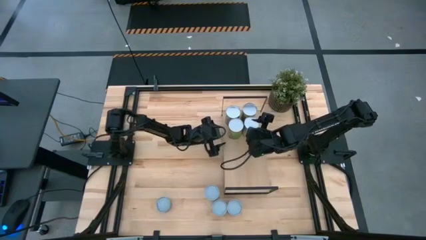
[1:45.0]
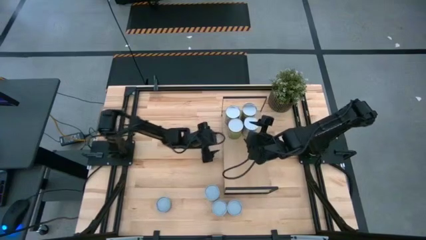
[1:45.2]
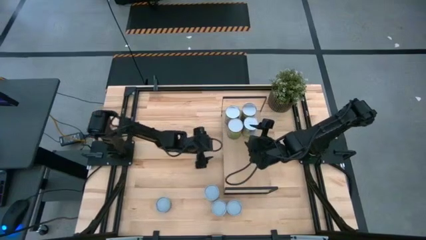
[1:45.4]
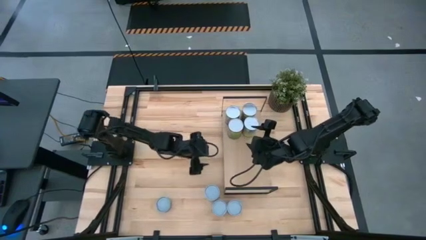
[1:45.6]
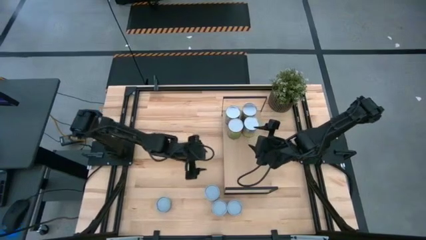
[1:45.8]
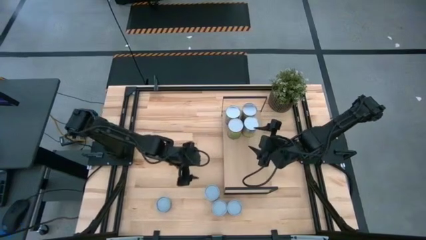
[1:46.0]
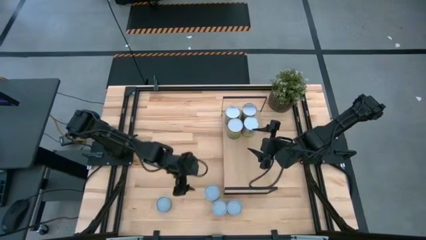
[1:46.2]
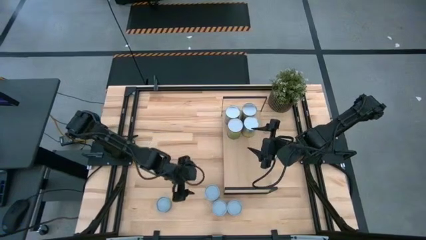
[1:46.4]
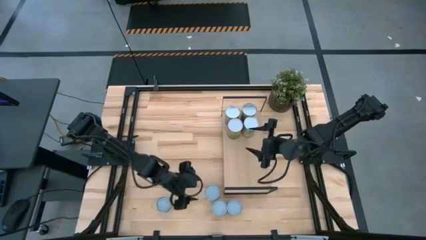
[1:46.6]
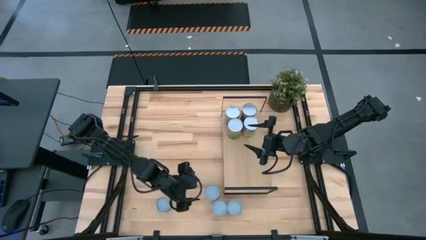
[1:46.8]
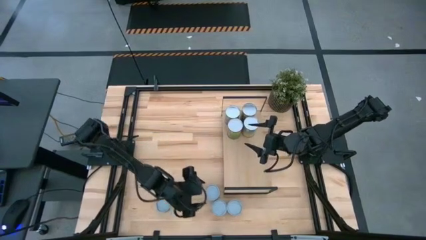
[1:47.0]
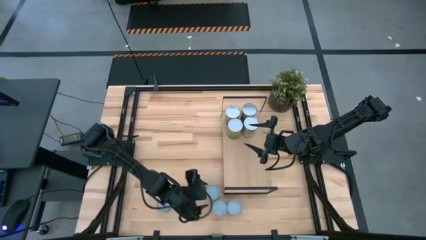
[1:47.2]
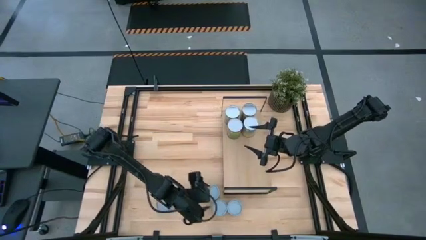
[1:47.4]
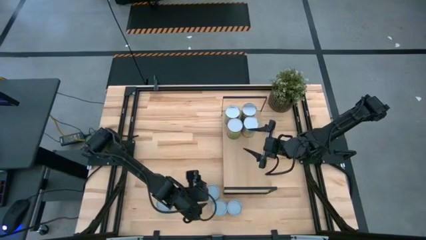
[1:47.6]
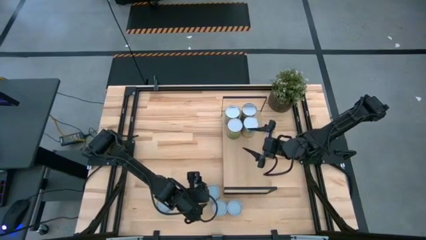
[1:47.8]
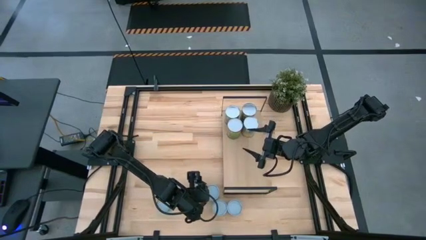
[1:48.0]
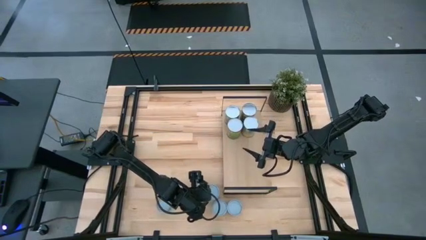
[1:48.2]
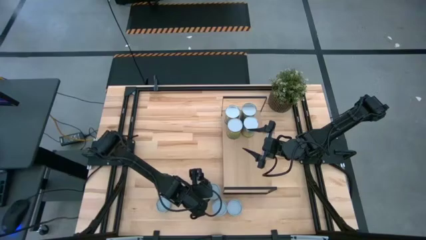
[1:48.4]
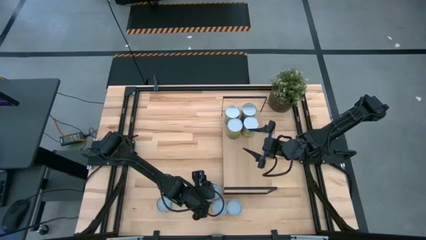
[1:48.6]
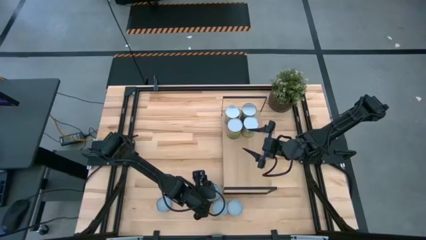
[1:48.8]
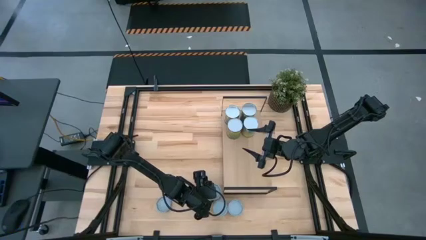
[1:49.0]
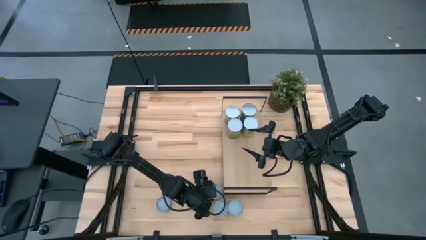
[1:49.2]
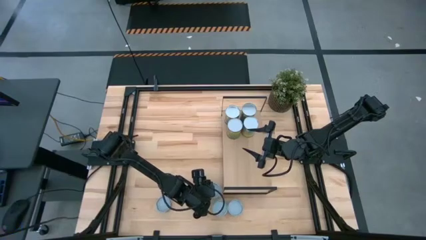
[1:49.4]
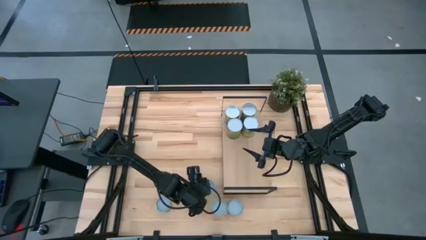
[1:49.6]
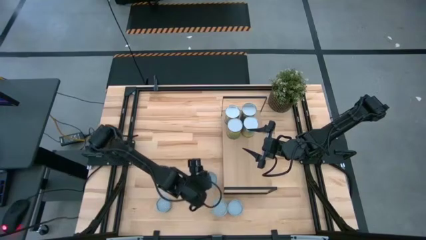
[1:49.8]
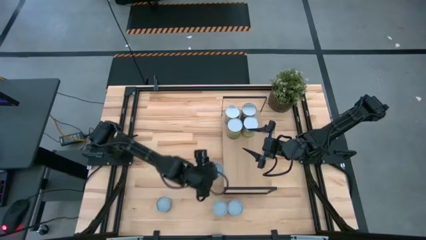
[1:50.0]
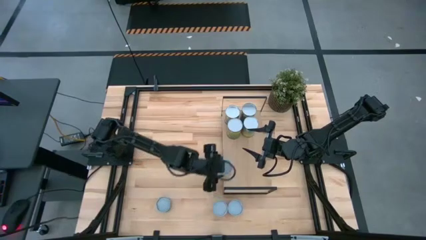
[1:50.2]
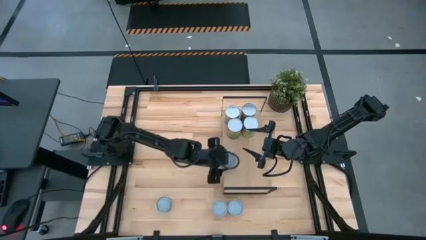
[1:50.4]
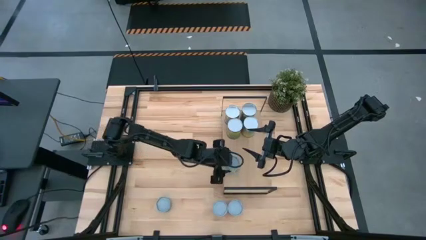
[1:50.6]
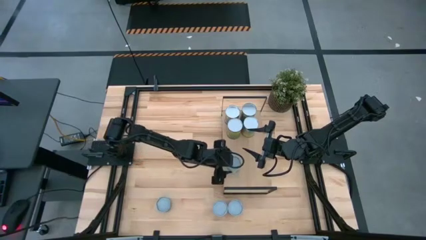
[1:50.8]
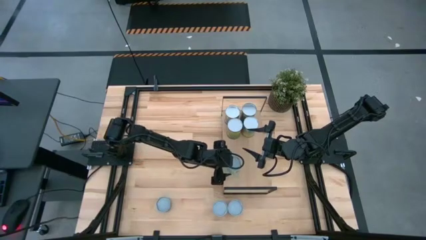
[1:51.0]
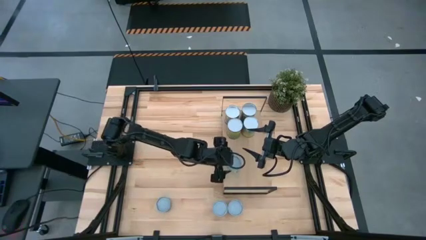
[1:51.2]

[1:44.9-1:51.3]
Task: Pick and place cans onto a shelf
Put the canned mixed vegetable on the shelf

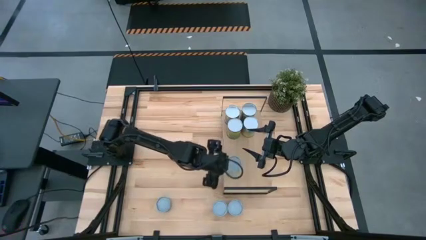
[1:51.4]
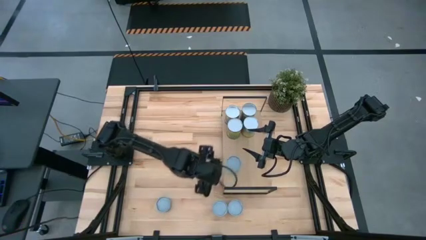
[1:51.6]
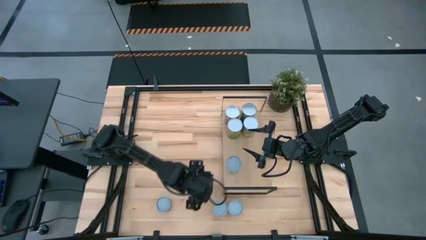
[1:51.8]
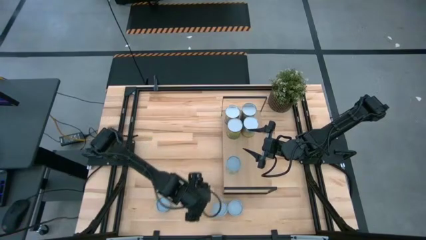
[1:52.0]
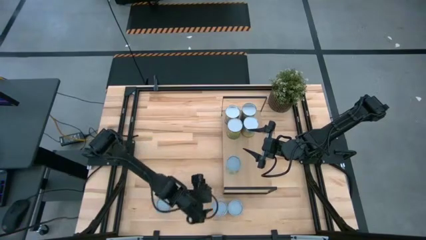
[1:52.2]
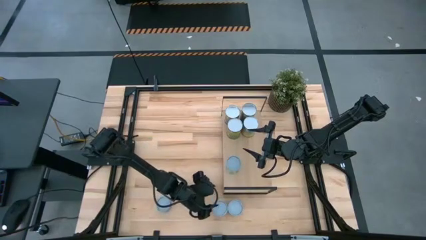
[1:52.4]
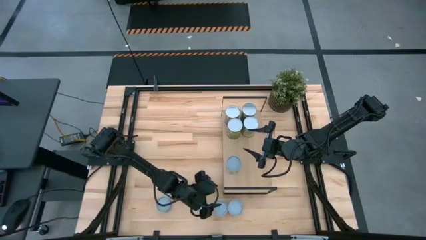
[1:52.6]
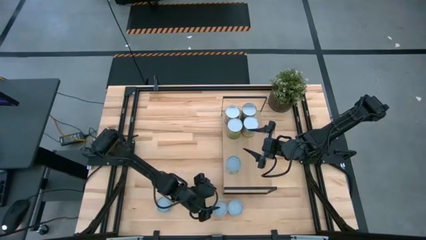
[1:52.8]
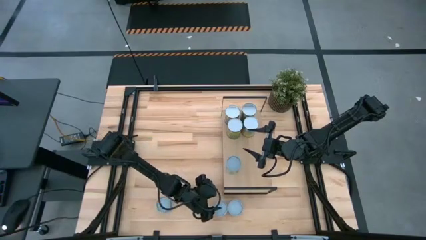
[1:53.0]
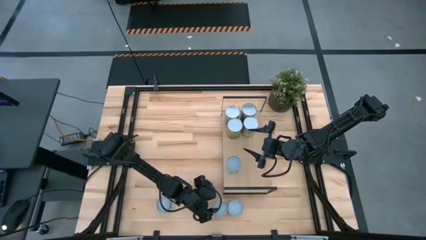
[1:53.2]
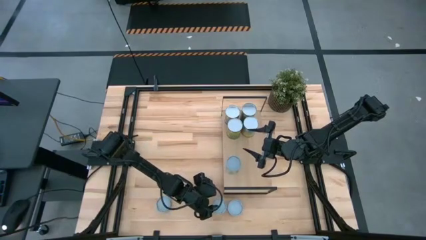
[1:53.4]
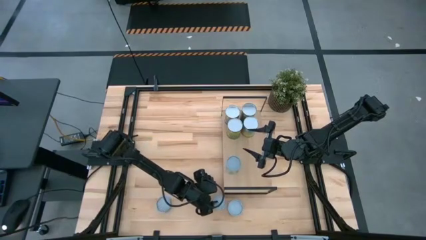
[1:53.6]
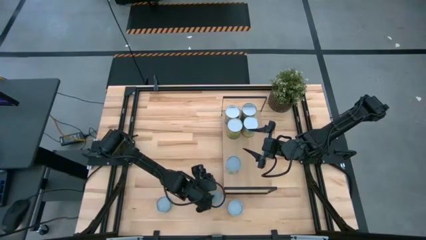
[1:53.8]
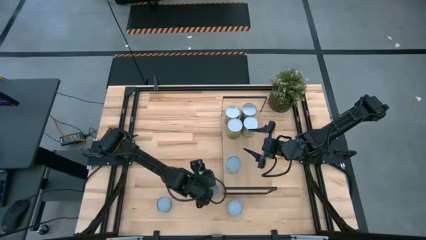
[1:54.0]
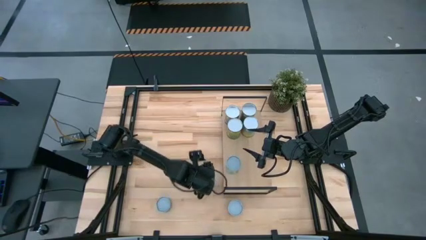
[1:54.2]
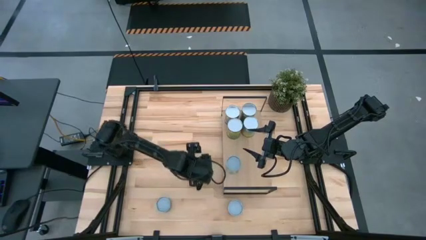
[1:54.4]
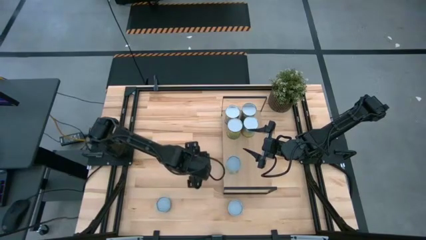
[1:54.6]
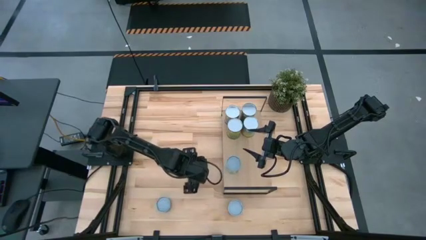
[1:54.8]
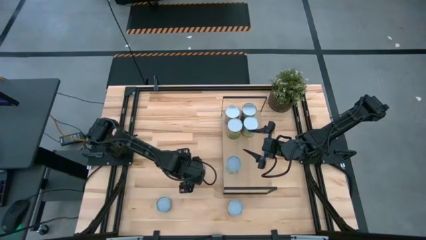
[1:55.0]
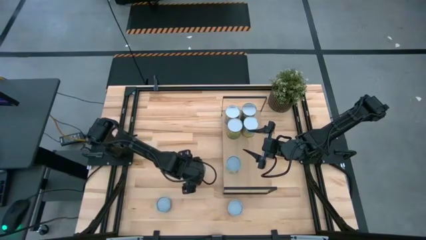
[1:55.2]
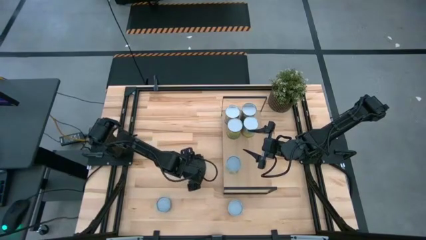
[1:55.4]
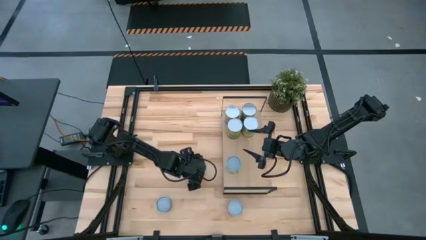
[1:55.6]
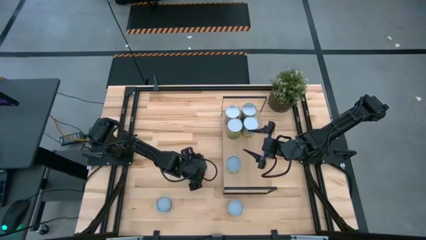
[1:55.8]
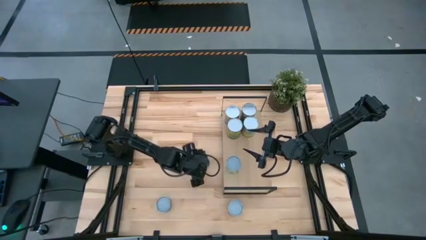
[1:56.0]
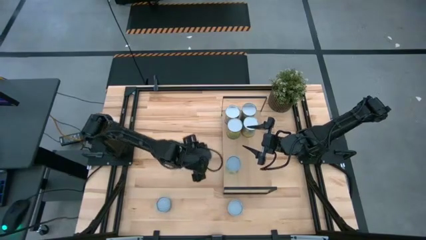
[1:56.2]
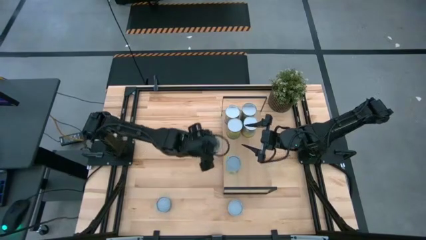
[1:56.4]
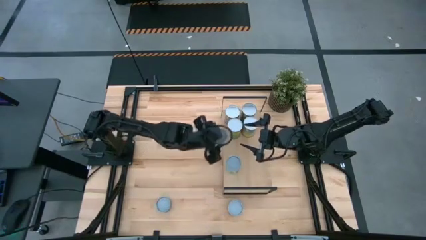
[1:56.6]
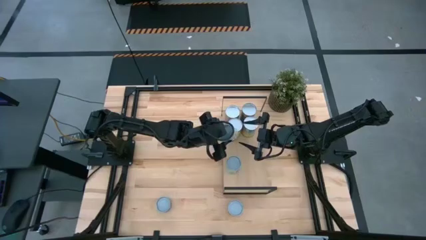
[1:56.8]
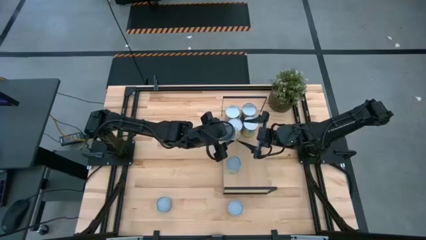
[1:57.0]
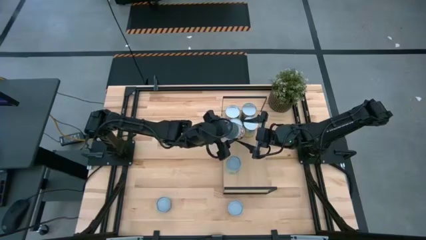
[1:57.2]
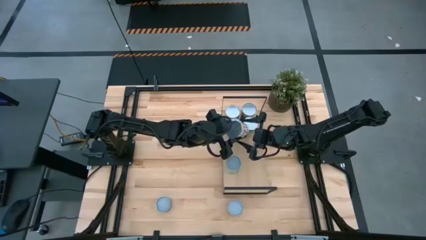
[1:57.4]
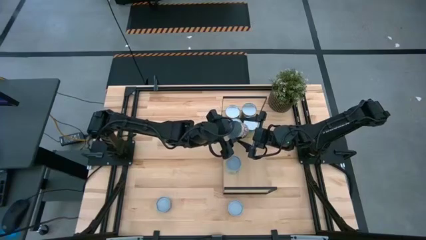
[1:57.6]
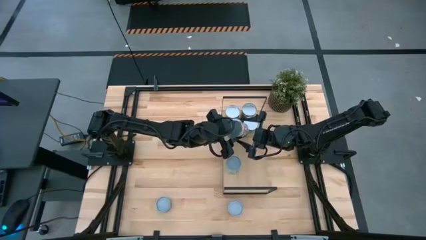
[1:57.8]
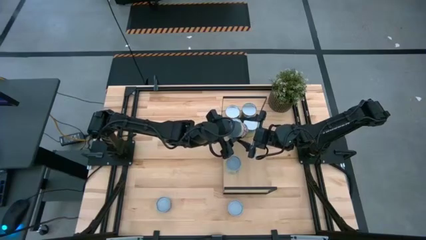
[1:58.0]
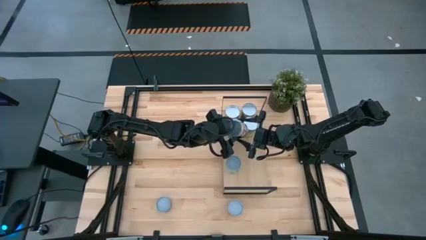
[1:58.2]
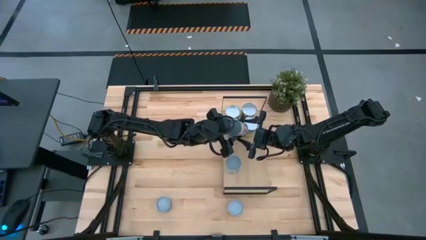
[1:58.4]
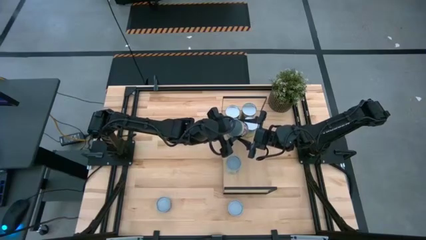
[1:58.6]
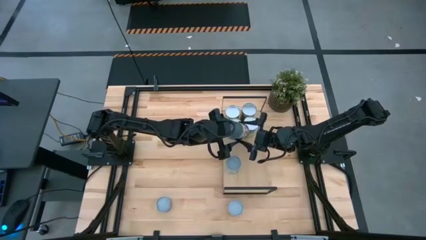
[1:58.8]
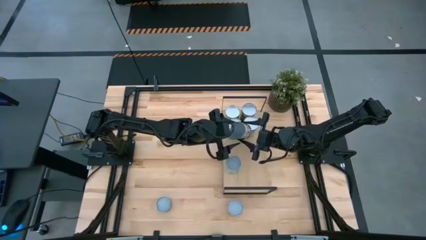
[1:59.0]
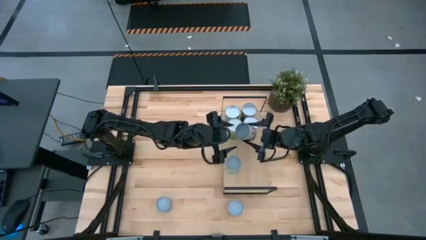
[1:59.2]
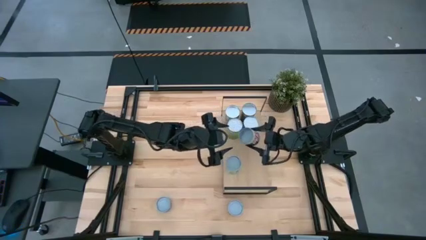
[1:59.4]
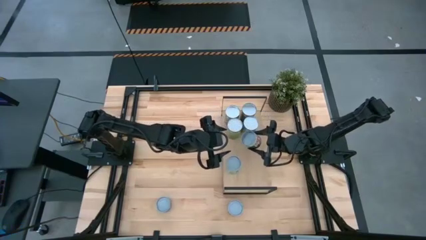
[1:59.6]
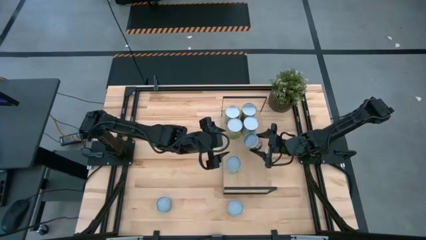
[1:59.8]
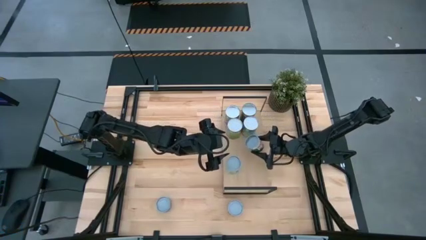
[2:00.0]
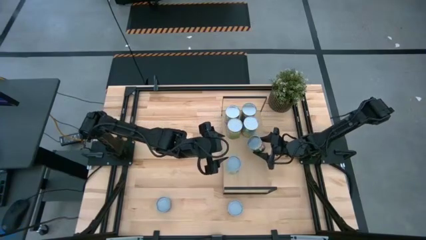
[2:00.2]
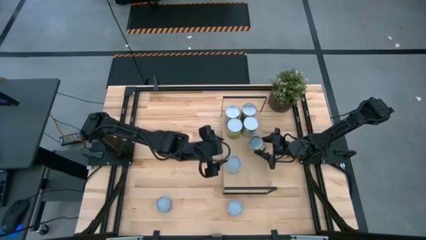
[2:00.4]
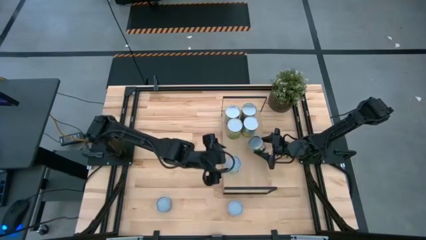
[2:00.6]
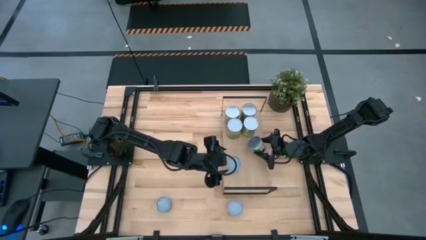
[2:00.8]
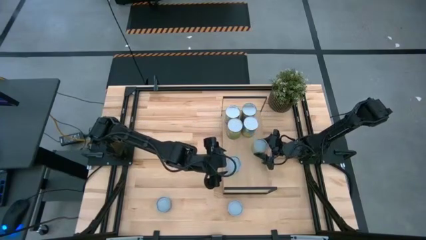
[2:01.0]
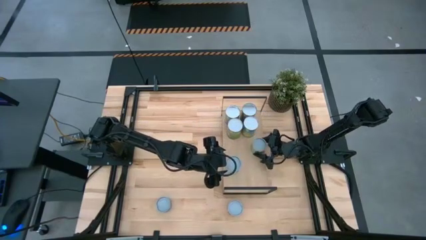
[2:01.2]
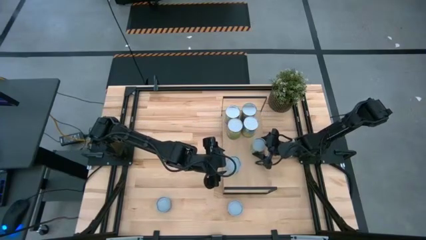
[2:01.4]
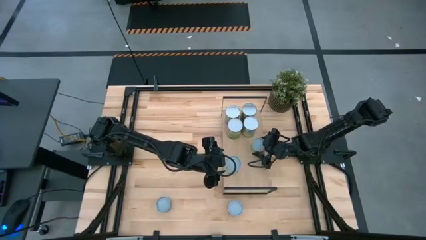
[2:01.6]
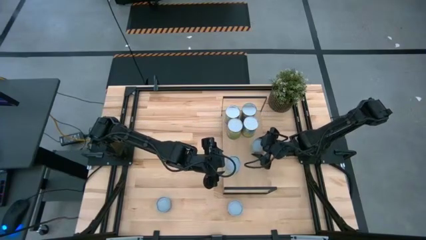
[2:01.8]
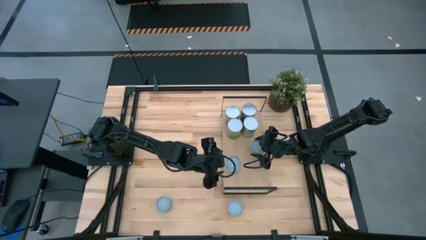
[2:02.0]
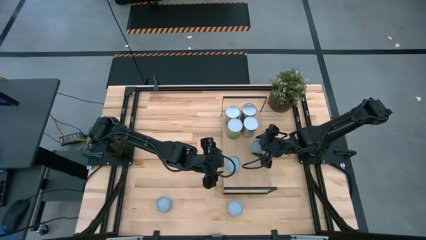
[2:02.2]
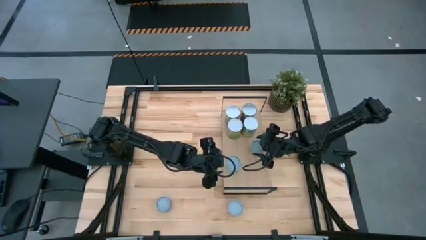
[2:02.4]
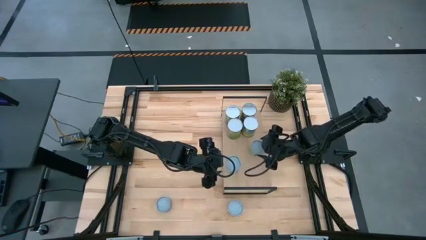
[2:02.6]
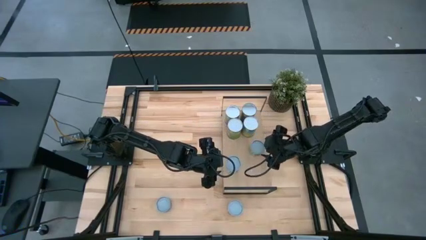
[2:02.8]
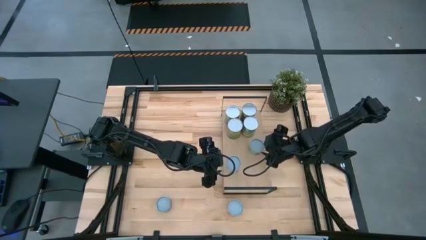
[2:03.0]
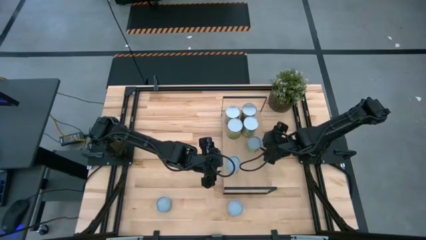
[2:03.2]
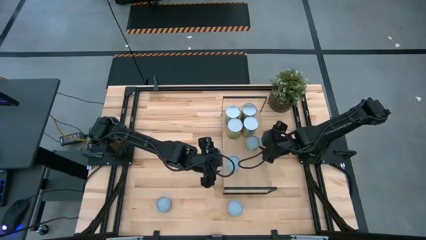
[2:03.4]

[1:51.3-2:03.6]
Put the canned green peas on the shelf
